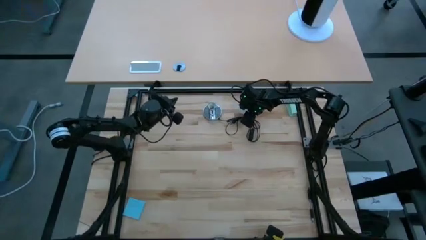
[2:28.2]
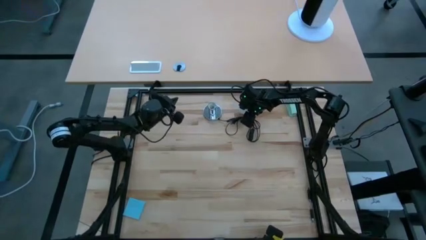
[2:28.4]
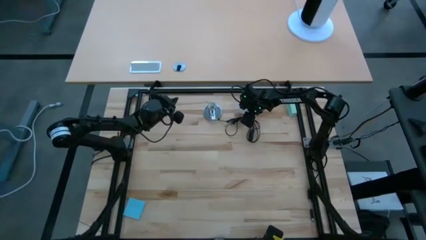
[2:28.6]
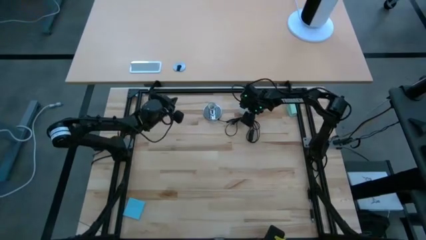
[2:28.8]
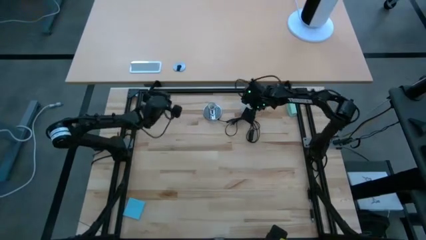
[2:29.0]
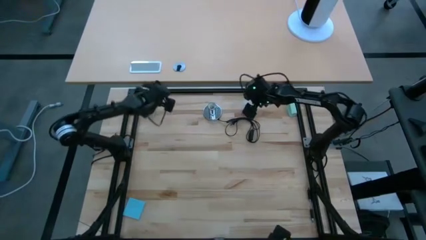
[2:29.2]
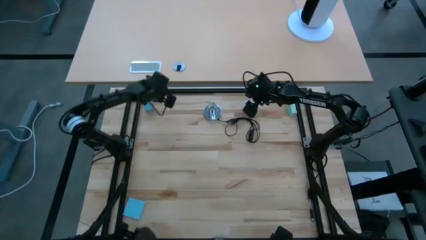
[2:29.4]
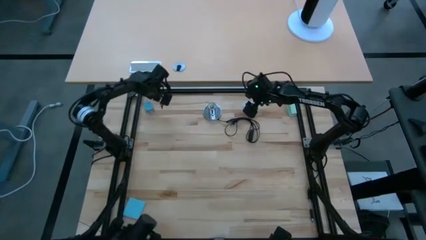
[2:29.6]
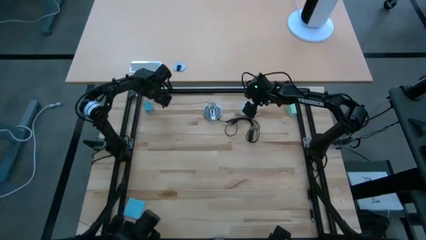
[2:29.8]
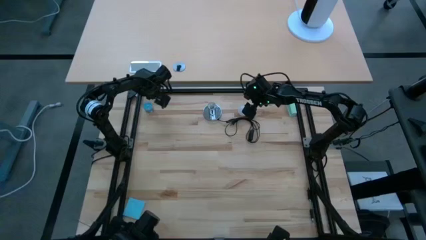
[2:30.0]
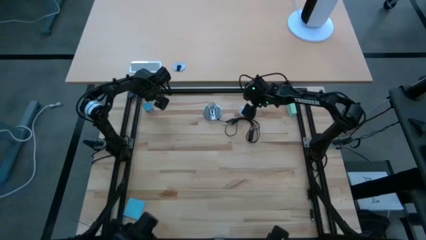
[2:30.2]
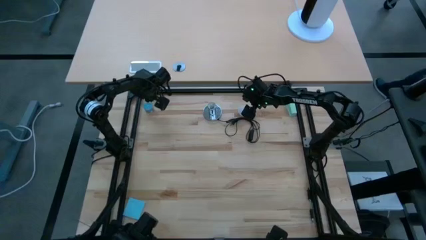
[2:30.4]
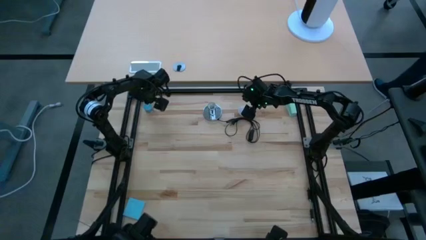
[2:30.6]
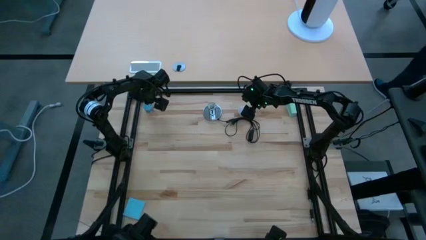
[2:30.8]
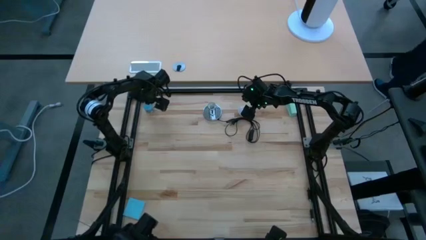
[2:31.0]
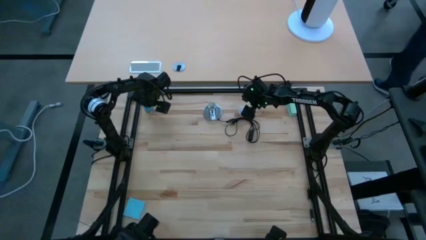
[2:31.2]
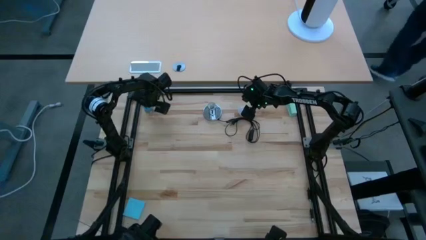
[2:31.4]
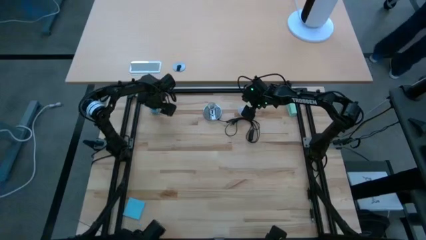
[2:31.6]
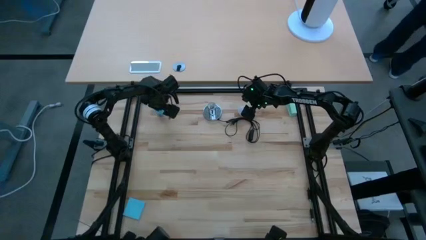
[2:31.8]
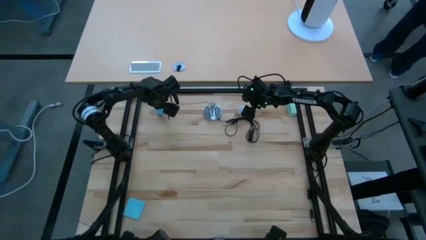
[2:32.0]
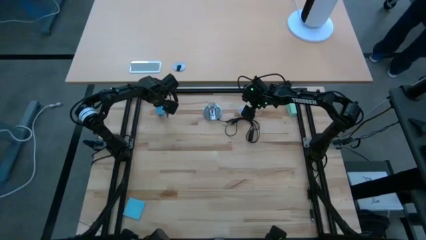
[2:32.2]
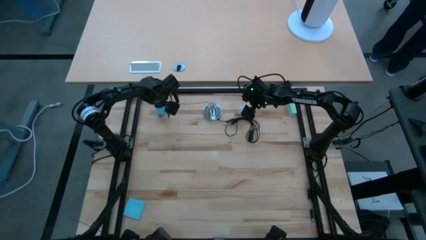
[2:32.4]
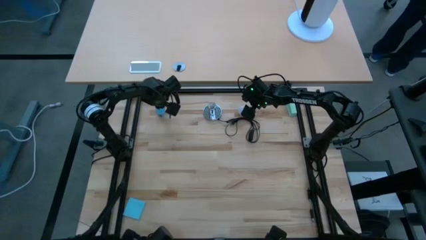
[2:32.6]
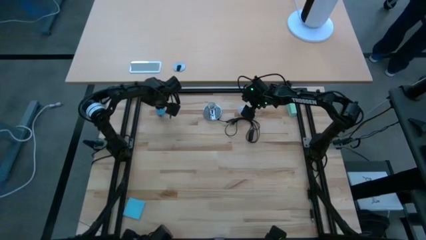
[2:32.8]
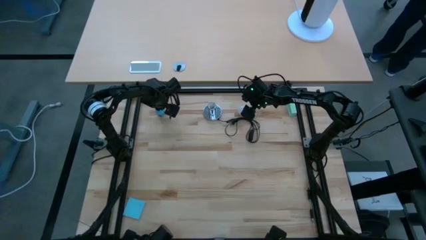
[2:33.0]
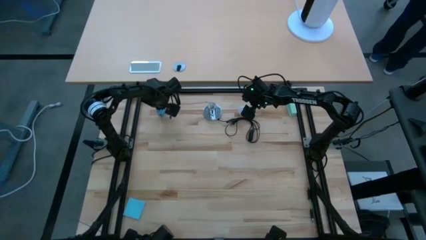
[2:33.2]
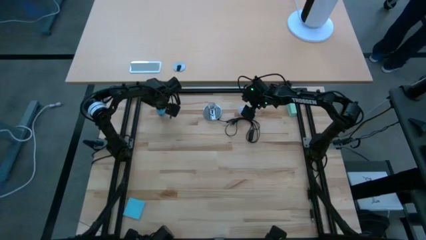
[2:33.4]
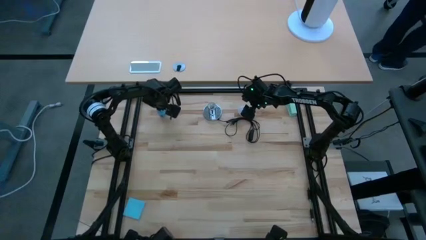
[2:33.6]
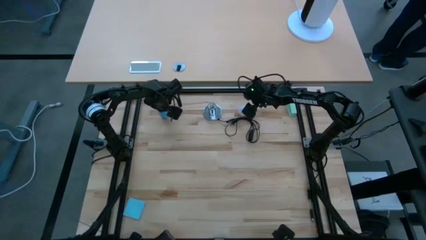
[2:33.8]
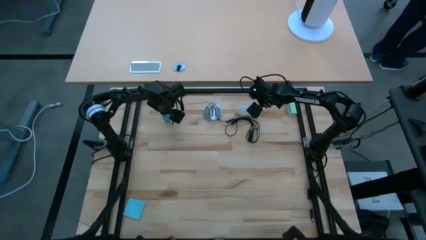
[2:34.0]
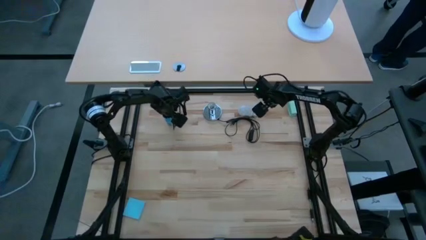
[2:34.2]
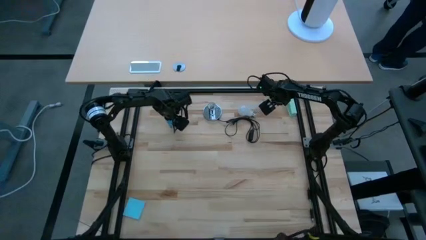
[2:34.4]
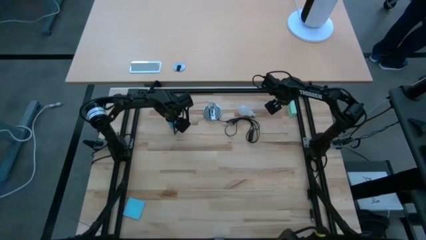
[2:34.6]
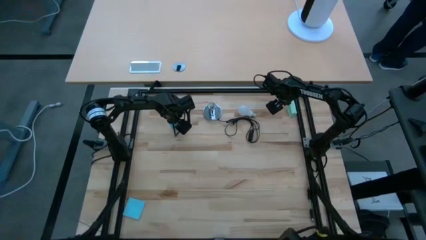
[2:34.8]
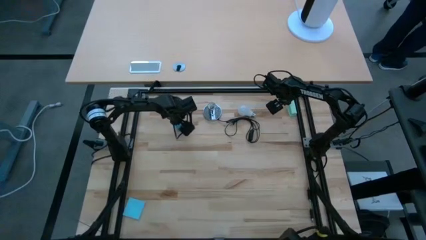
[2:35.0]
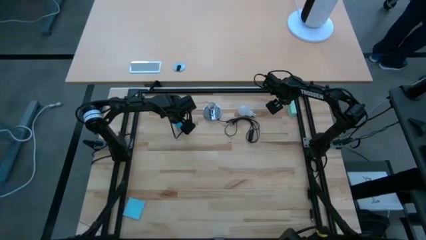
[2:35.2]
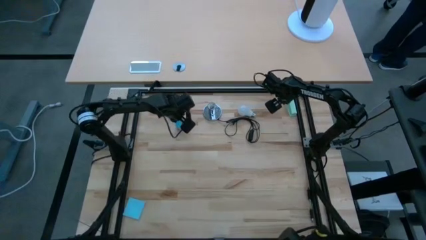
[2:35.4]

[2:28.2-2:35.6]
Task: Screw lightbulb
Move the blue candle to the top left of the table

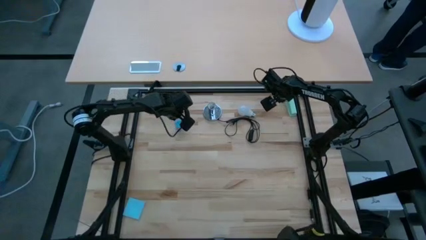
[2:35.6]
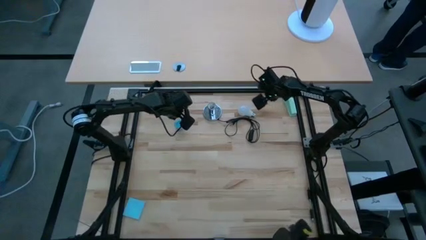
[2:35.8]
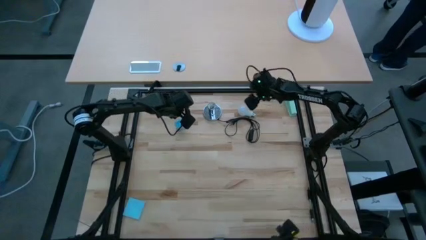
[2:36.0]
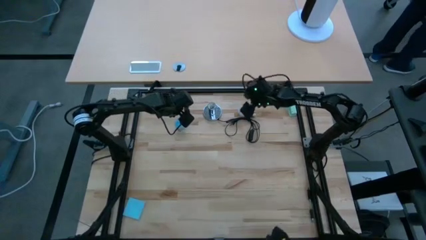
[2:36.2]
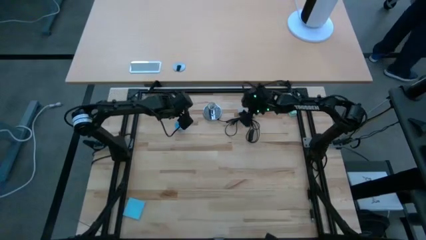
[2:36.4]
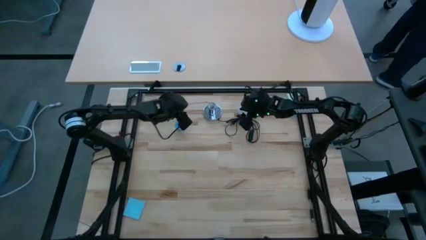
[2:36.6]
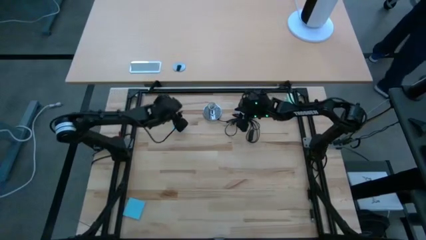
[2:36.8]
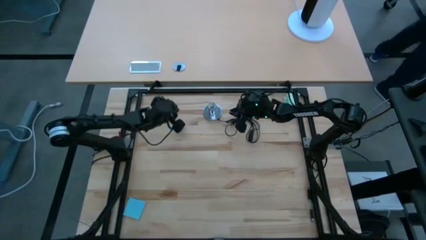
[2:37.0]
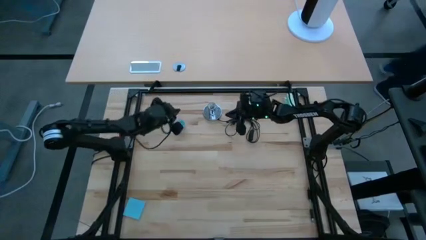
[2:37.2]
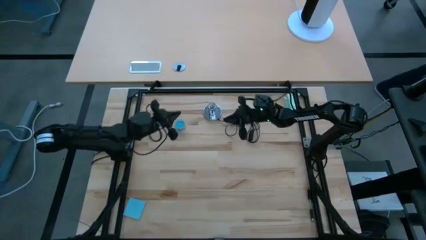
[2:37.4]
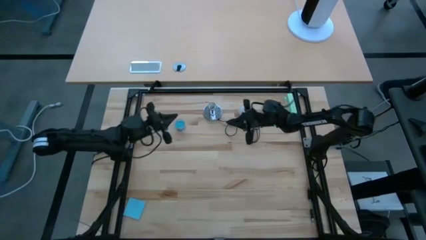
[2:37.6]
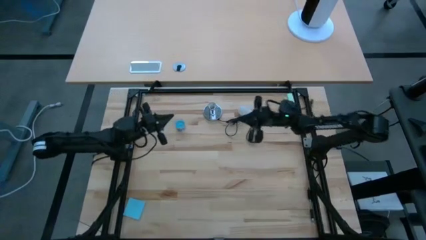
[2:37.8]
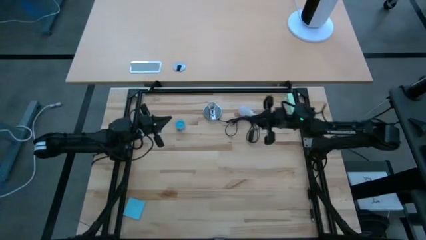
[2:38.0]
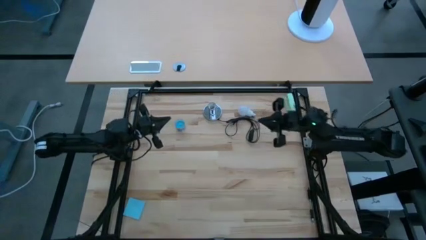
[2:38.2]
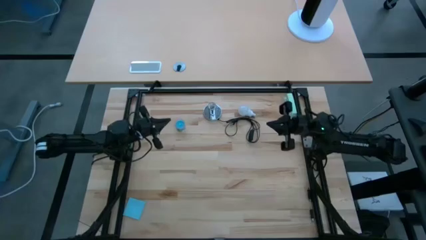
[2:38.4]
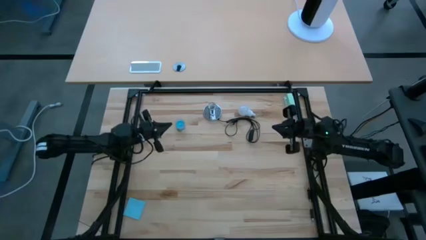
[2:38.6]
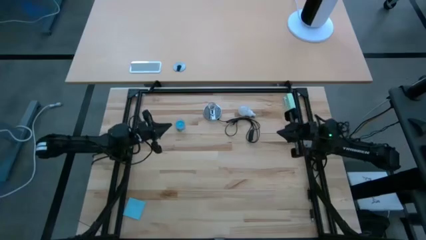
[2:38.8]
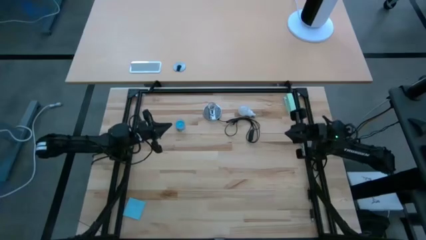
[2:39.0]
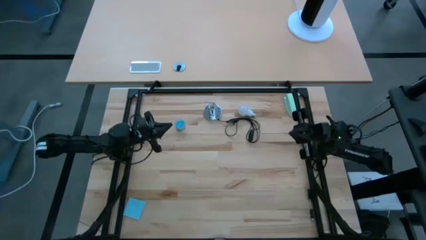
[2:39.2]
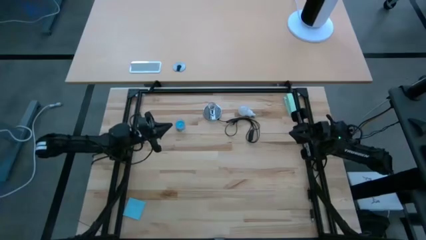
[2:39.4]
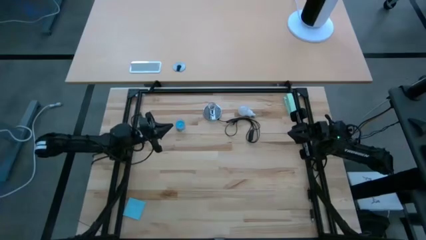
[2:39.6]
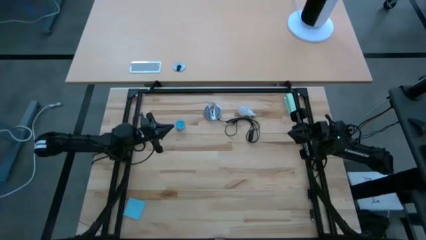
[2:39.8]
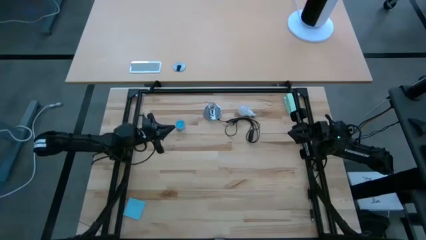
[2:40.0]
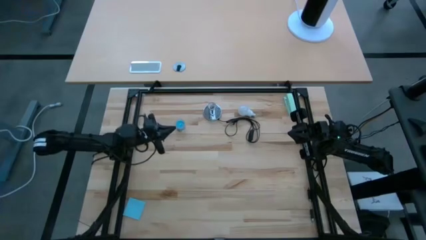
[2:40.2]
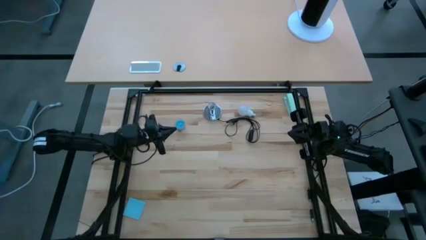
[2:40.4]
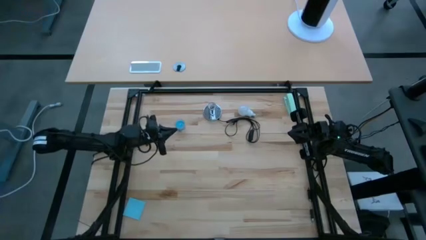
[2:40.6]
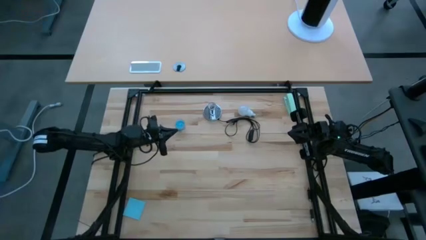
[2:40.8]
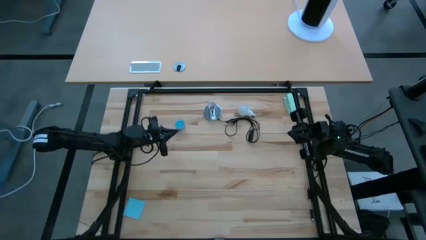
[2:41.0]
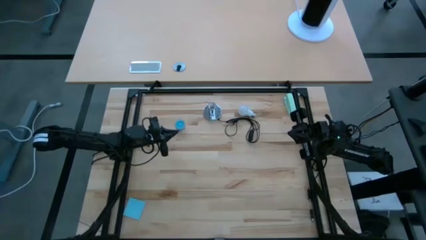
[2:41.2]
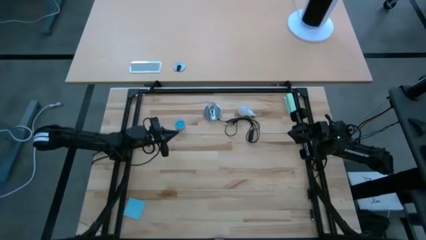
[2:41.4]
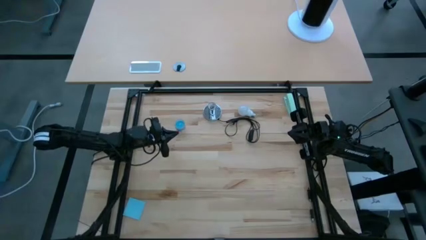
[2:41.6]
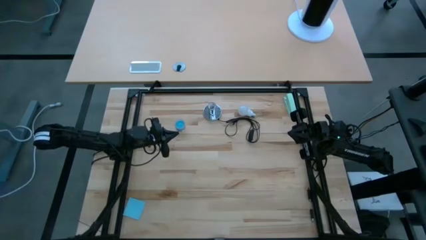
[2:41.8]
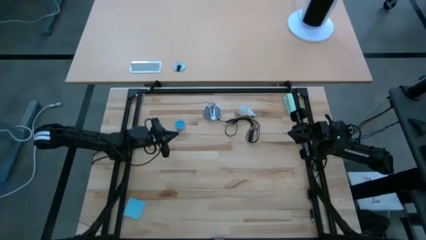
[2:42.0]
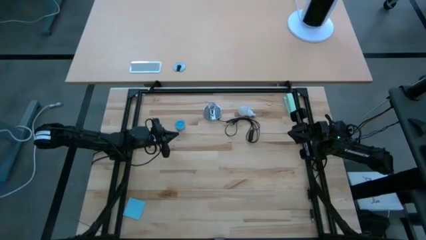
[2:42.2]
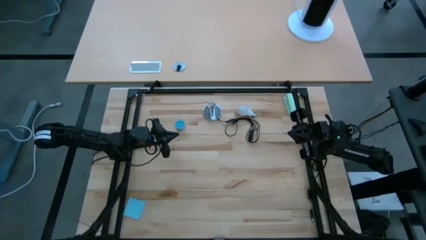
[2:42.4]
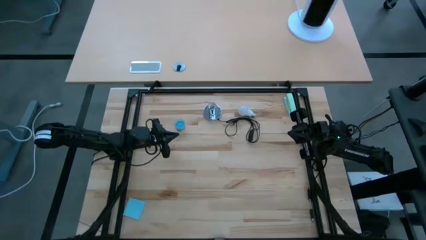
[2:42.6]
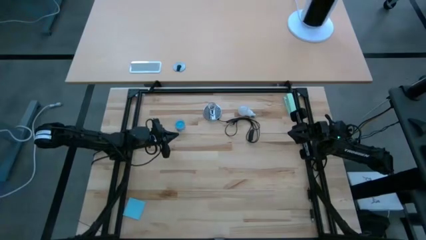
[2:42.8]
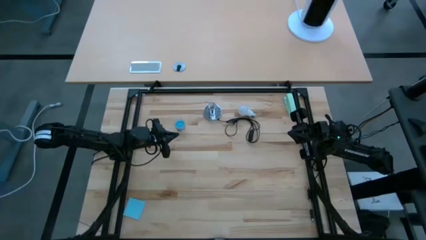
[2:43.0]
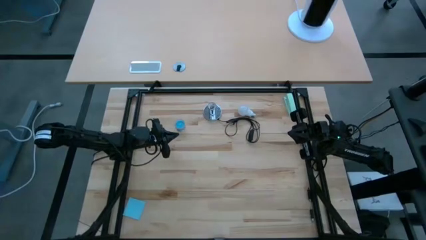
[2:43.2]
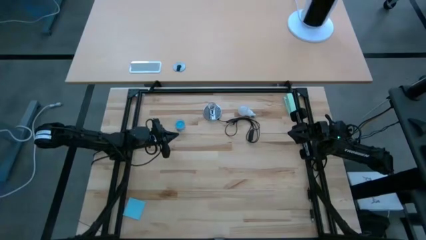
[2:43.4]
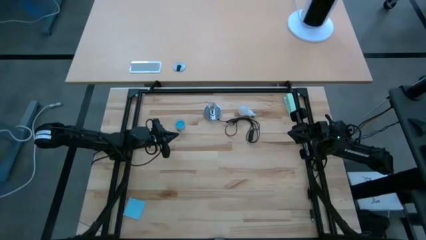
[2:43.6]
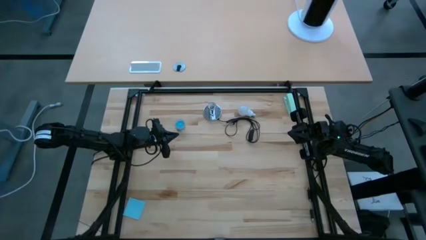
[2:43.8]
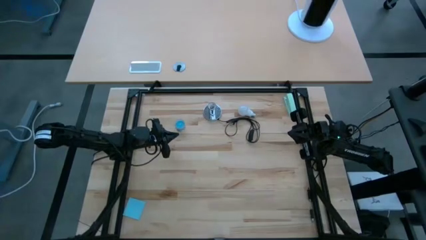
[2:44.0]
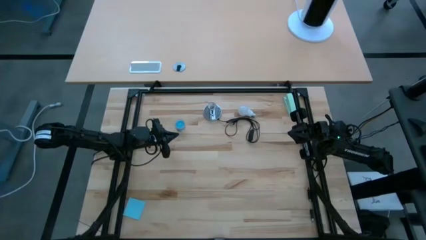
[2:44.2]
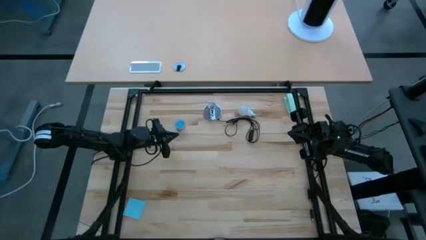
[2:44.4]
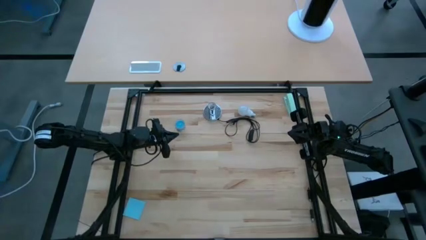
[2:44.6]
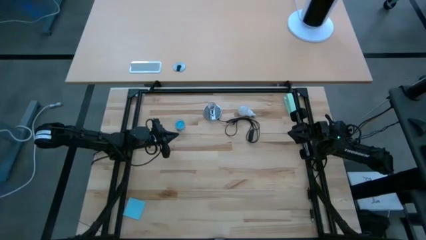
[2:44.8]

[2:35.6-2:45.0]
Return to Home Position
